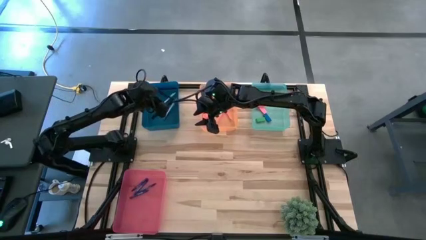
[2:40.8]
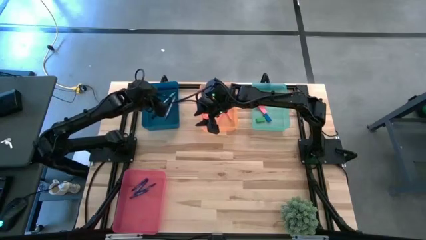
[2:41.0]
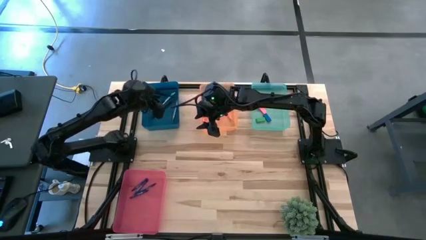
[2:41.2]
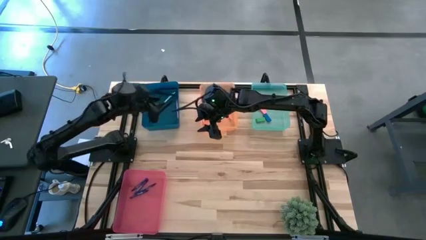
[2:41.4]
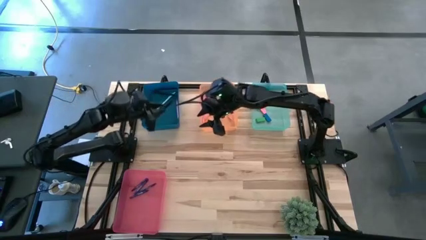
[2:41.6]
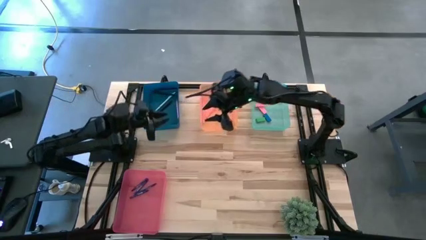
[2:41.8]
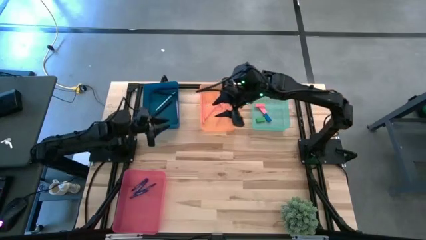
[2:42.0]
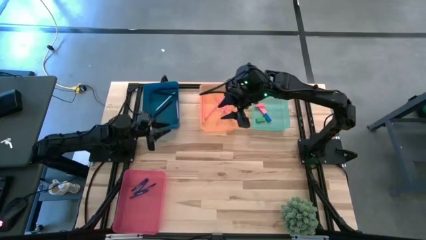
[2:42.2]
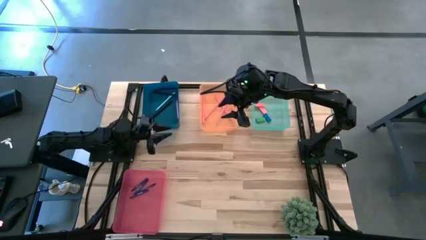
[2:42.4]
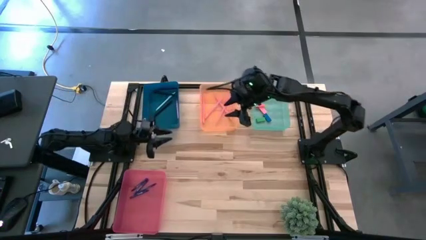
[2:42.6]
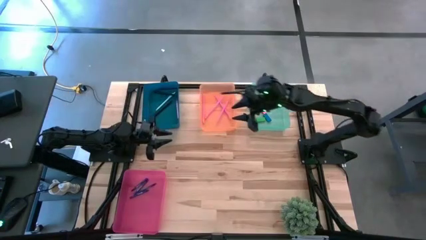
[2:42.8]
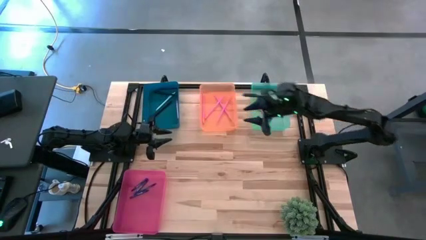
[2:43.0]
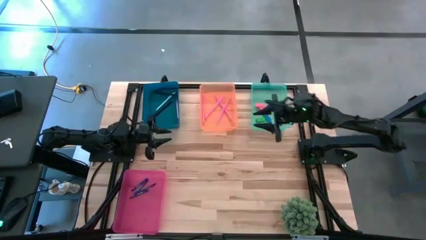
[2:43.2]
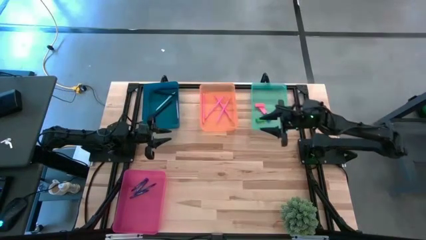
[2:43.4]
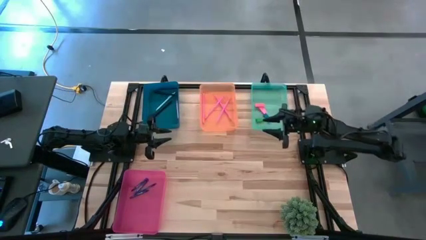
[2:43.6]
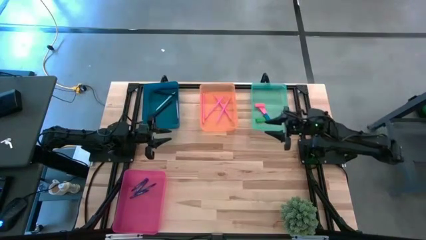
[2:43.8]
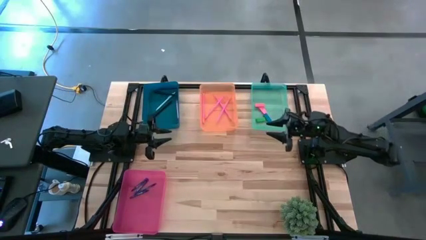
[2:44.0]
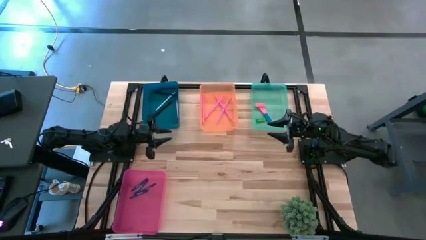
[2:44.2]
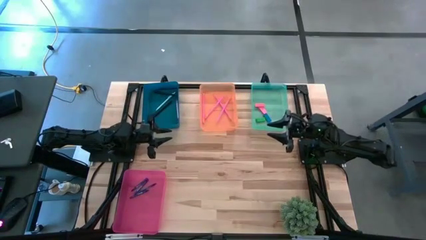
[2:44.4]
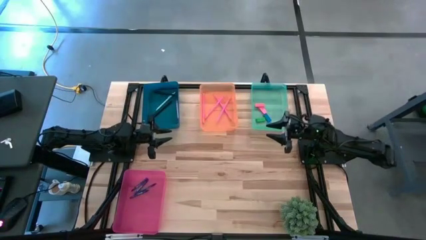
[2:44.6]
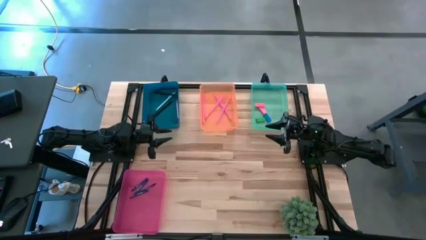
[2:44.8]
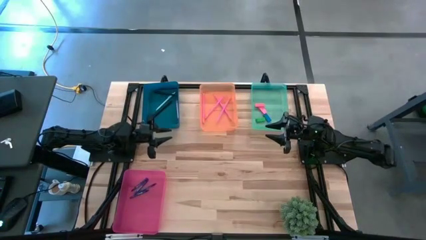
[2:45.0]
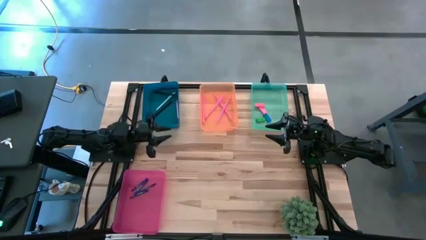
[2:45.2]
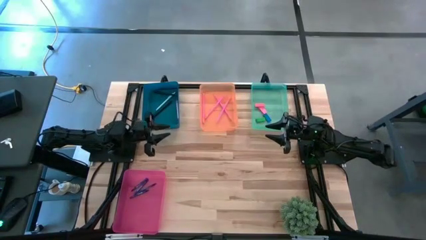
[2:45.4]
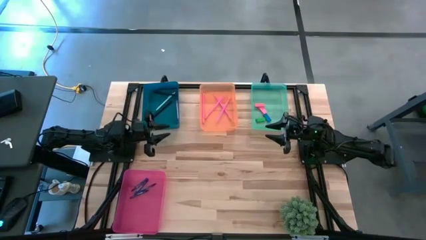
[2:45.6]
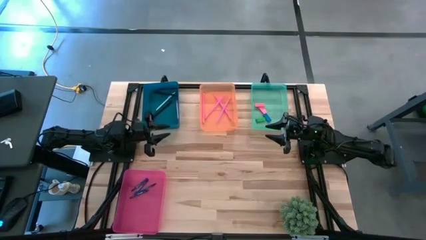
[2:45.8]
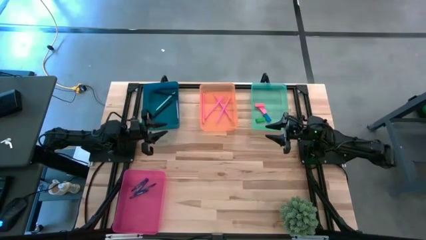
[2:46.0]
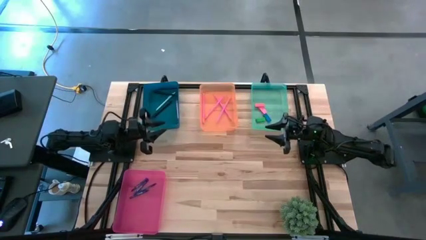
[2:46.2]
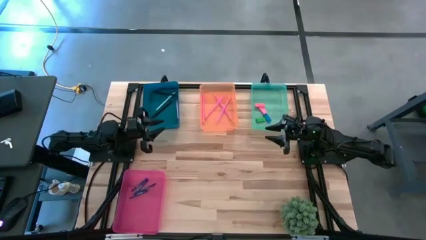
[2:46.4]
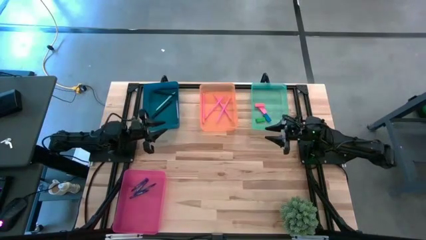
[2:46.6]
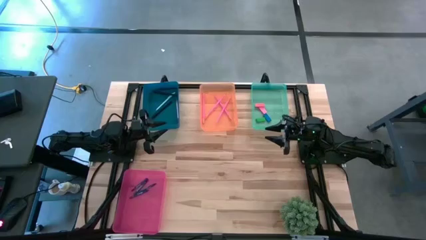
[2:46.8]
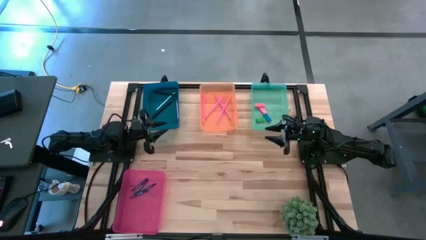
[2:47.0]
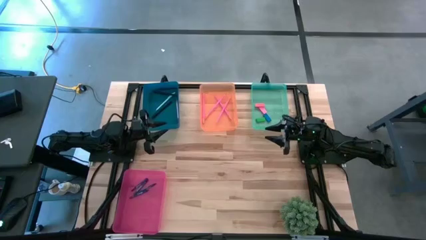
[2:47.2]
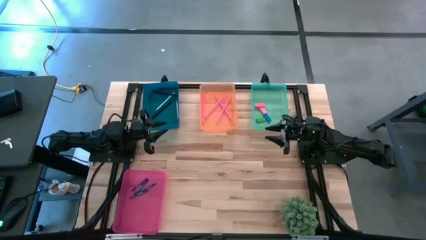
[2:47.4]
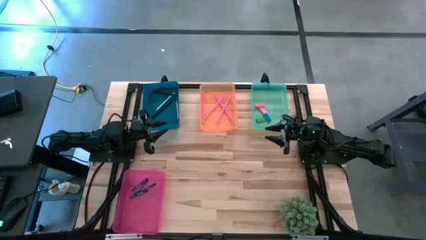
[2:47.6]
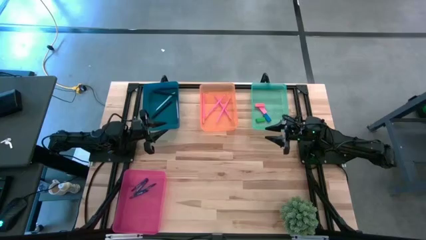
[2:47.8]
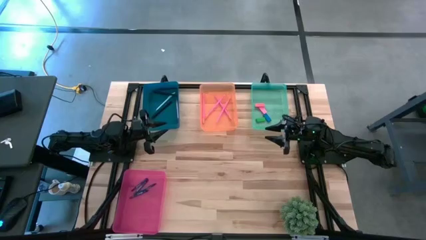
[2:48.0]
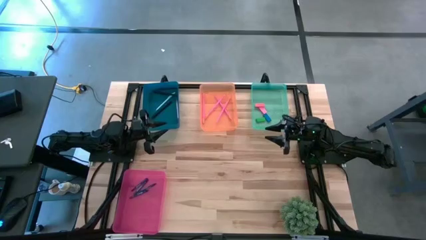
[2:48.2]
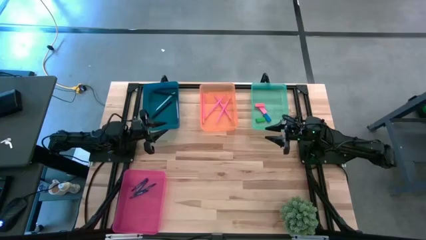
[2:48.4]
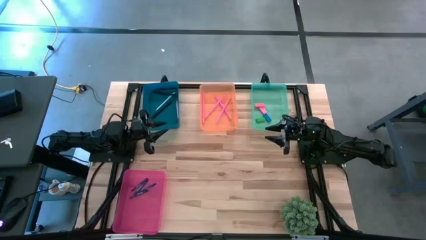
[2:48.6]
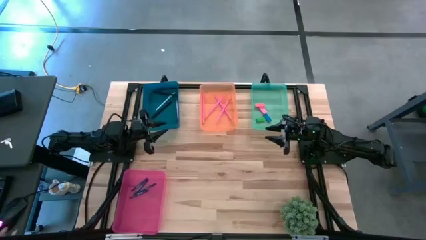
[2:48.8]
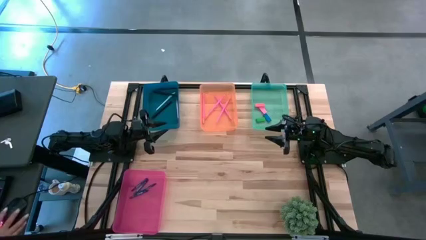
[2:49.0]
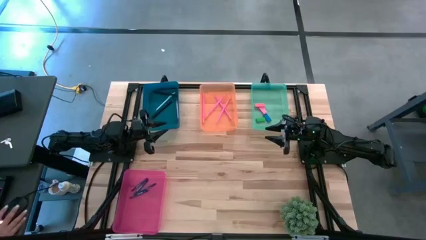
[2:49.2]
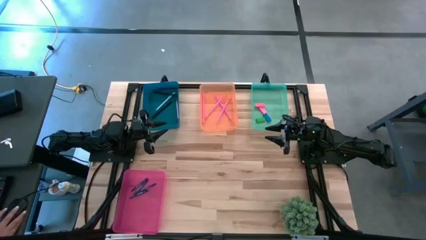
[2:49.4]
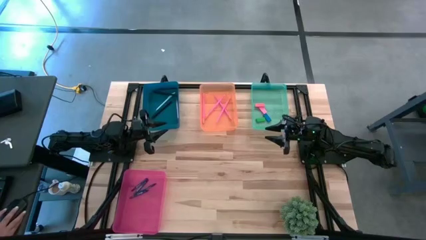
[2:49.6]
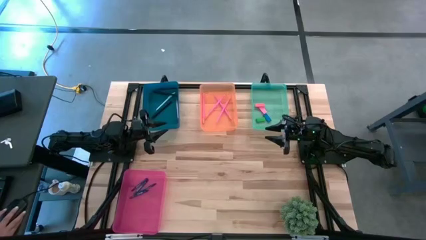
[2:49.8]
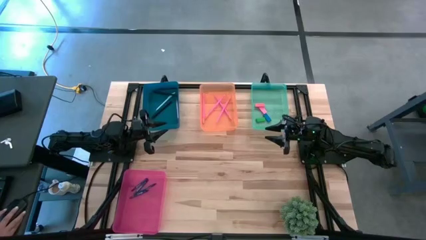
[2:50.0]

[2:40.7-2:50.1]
Task: Sort crayons/erasers/pens/pencils in bins
Return to Home Position

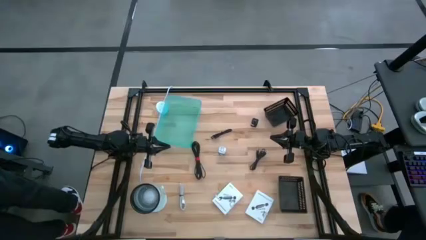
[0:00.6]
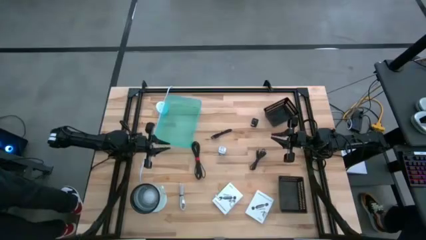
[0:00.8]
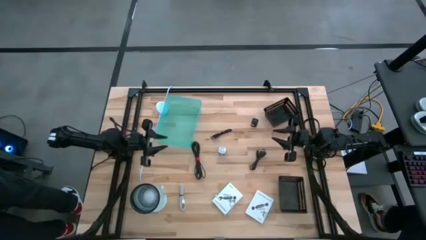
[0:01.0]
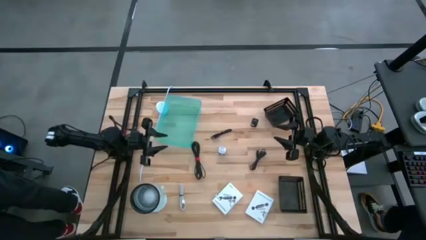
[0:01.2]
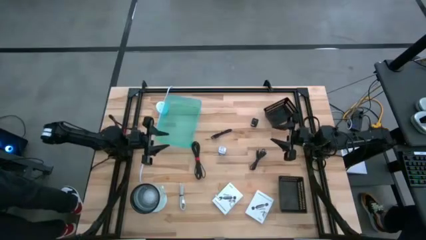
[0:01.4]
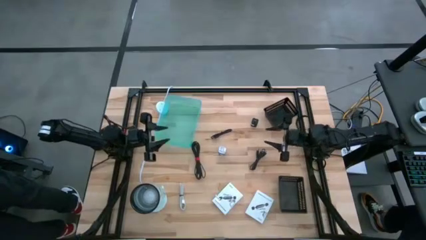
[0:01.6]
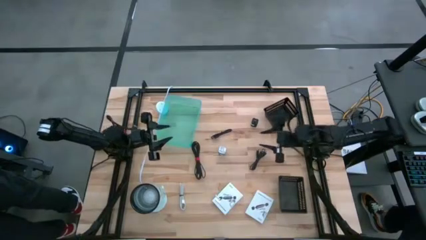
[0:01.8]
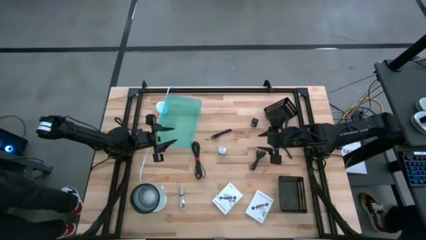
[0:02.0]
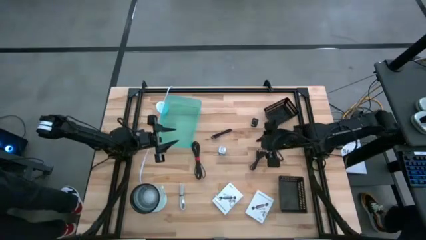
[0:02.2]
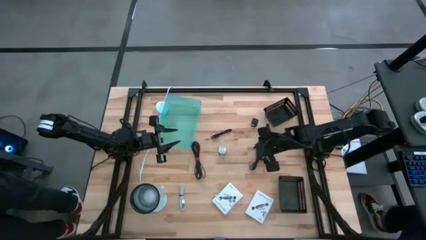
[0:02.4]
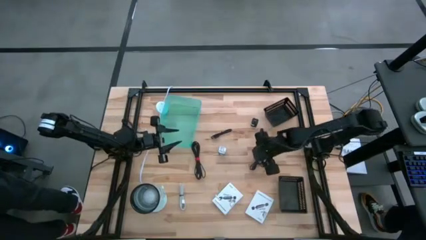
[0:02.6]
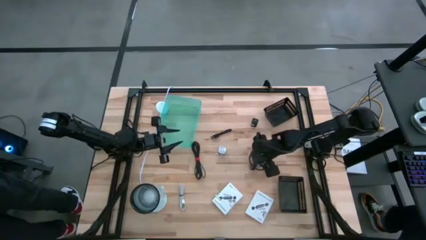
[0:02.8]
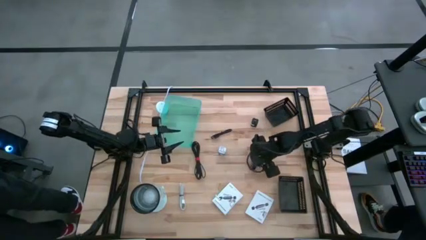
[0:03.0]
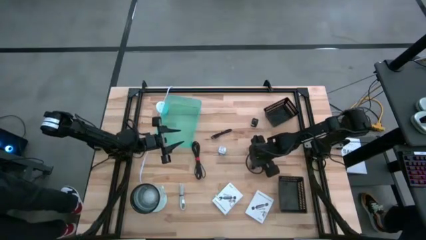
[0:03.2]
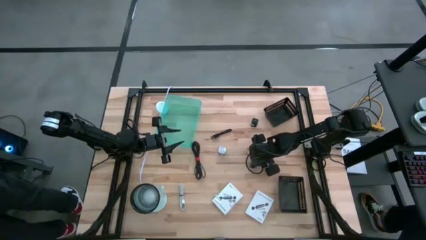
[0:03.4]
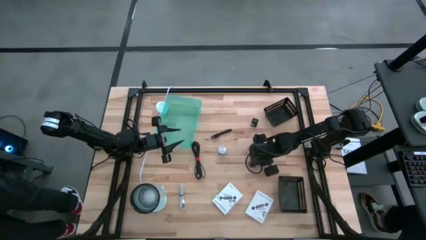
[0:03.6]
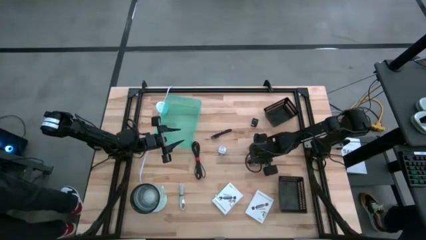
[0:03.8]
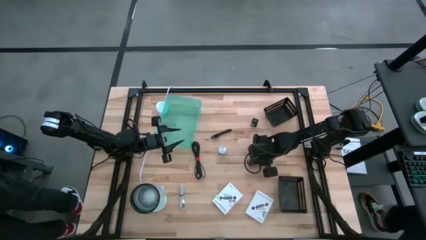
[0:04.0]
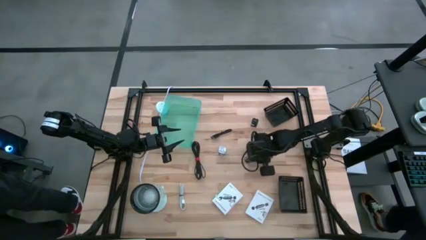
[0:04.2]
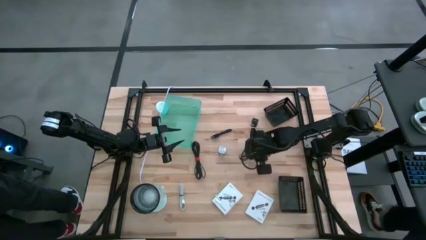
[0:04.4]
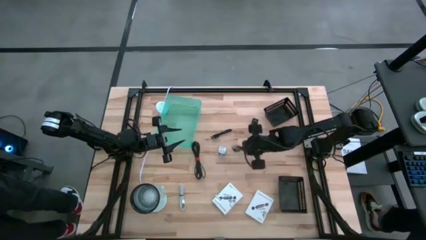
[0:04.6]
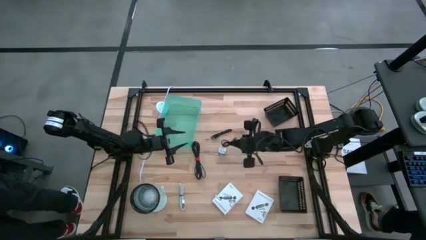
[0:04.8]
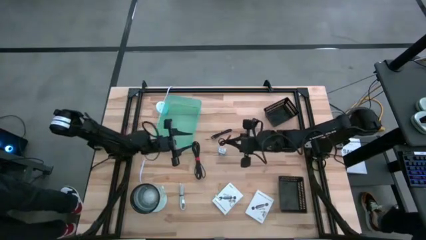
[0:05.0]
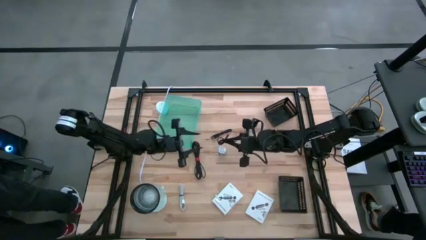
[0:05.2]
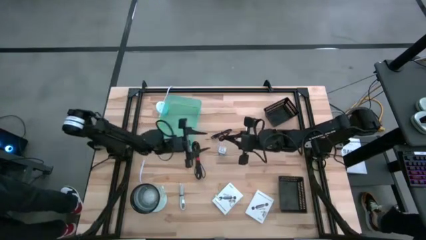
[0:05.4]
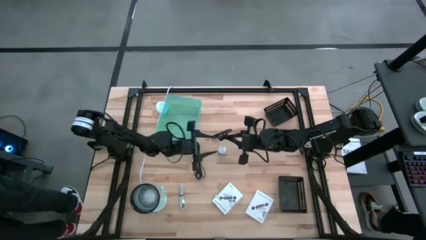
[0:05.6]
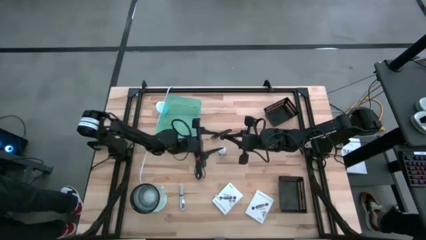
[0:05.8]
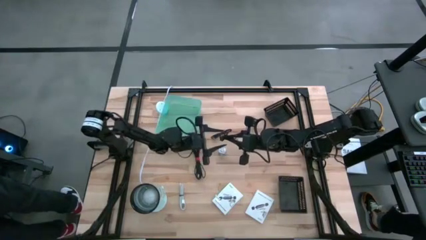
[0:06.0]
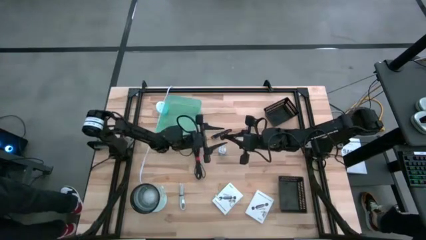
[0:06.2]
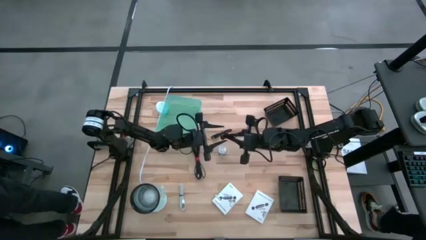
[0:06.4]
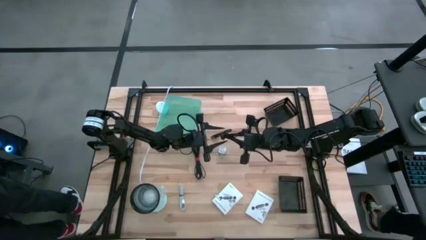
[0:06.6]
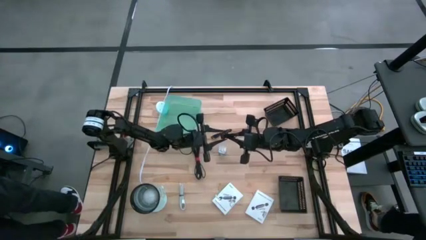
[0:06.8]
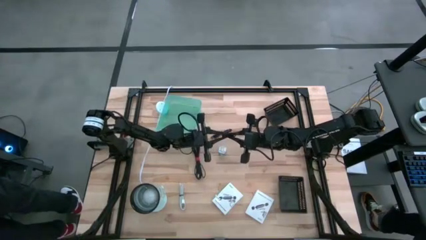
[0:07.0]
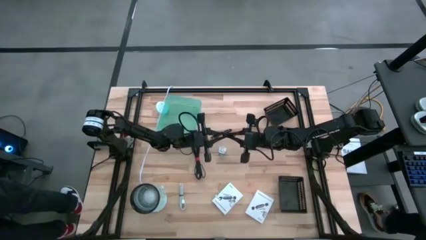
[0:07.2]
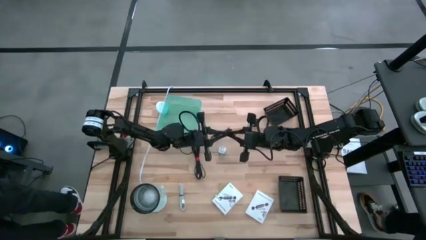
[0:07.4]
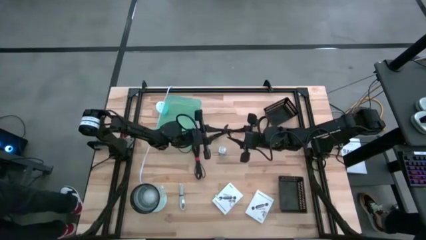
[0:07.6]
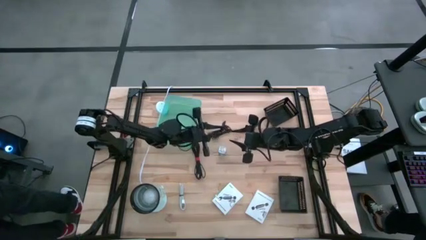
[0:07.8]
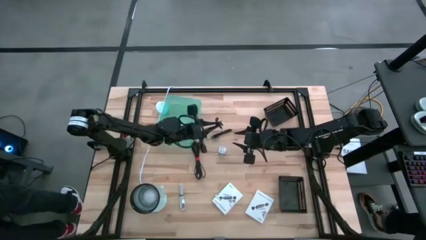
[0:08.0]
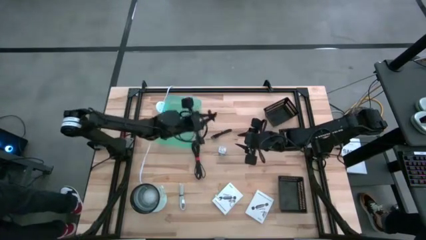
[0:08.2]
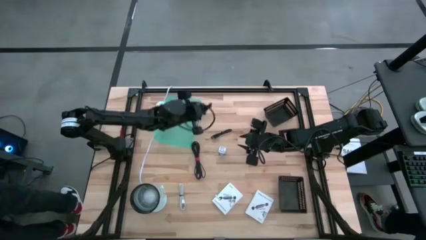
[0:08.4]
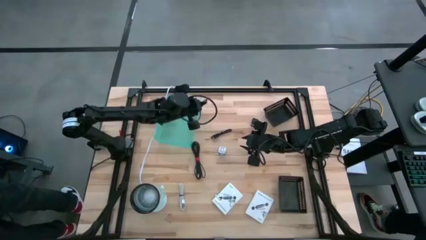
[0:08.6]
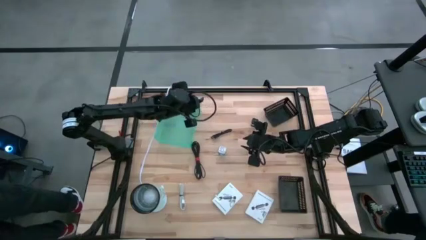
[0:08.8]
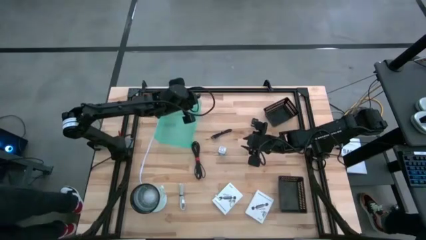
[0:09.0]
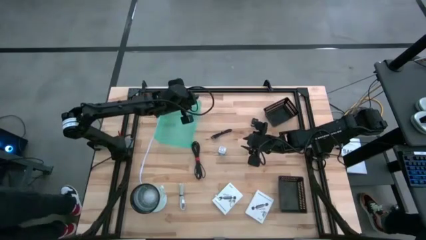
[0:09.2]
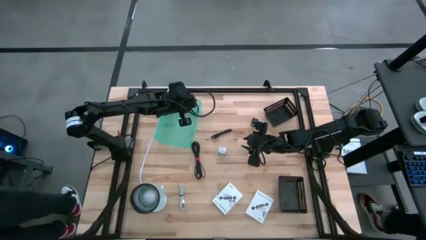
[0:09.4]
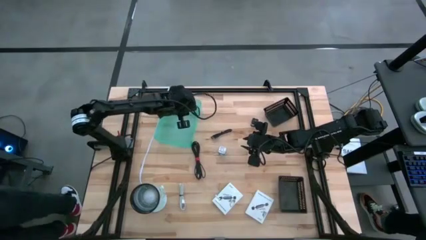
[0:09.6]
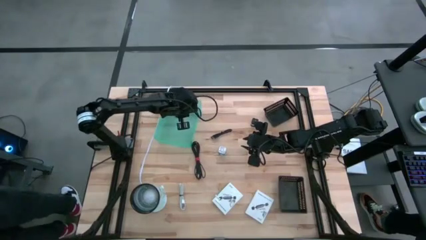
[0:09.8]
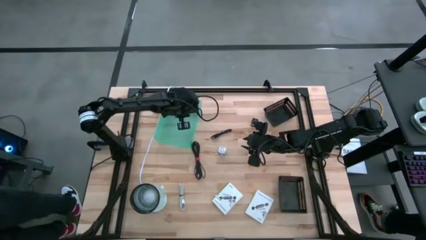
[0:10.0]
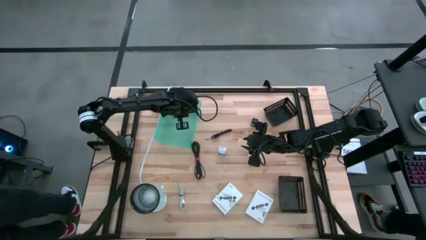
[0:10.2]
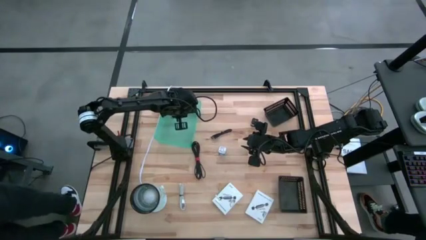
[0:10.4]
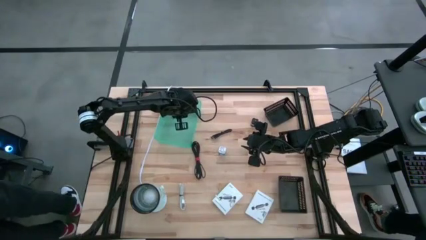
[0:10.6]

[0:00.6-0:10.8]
Task: Pick and place items into bin
Put the bottom small black charger cable into the green bin
